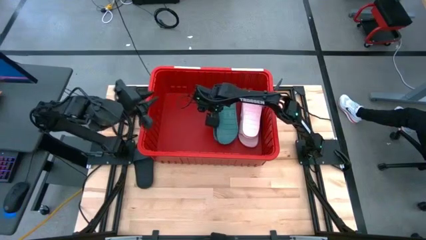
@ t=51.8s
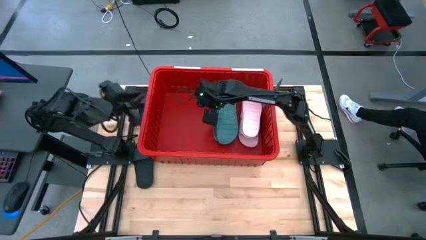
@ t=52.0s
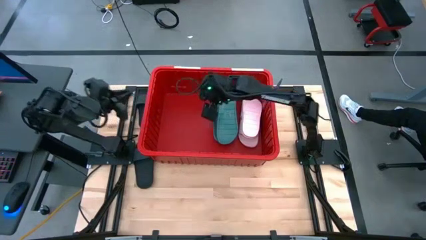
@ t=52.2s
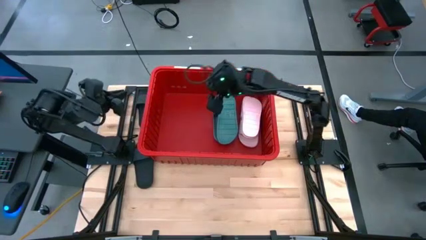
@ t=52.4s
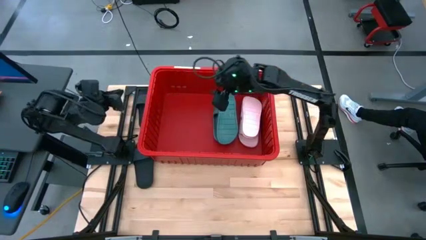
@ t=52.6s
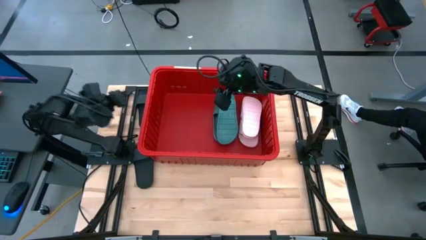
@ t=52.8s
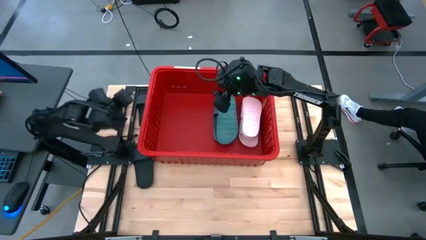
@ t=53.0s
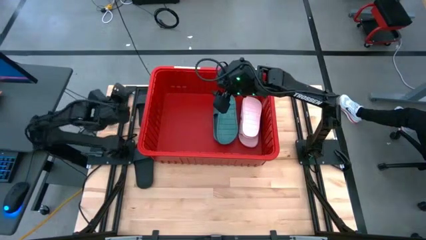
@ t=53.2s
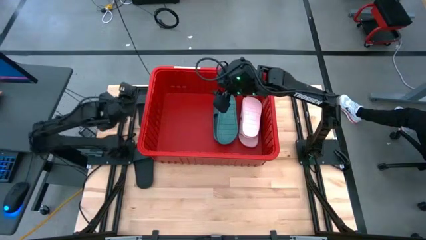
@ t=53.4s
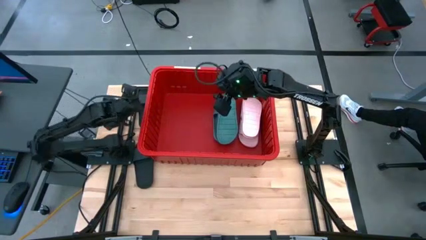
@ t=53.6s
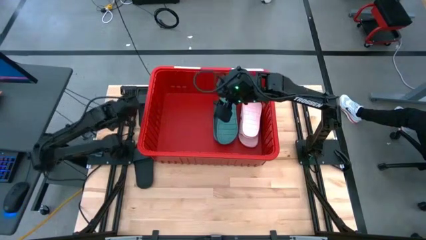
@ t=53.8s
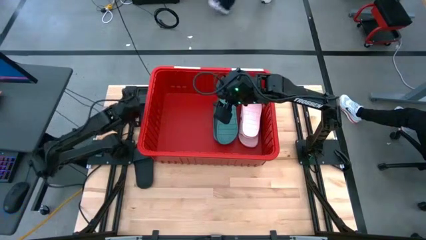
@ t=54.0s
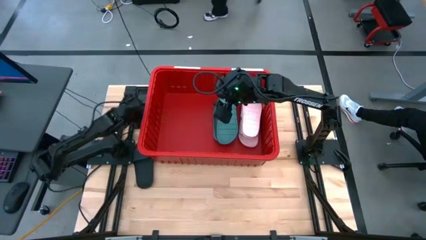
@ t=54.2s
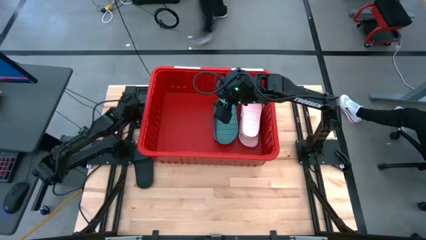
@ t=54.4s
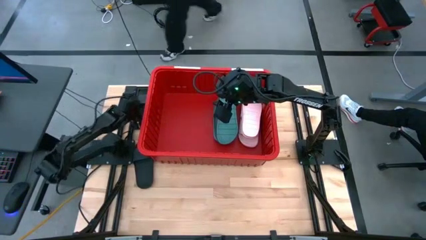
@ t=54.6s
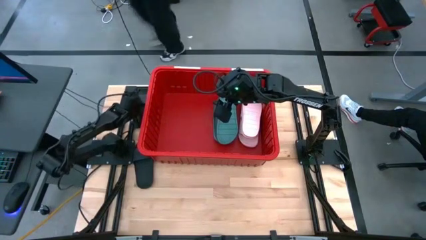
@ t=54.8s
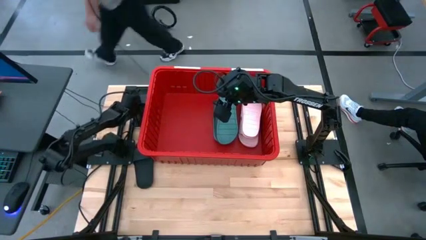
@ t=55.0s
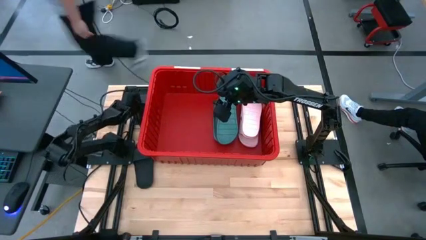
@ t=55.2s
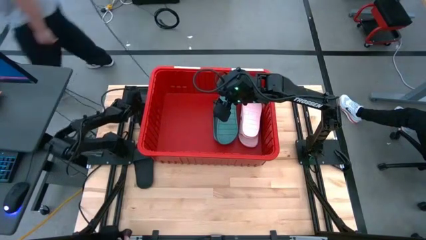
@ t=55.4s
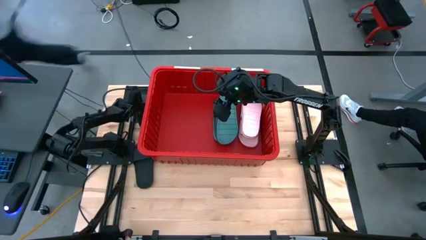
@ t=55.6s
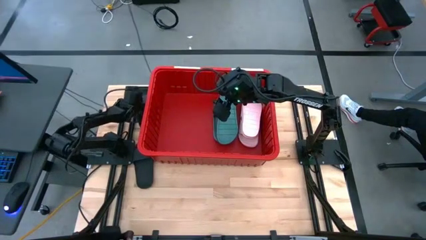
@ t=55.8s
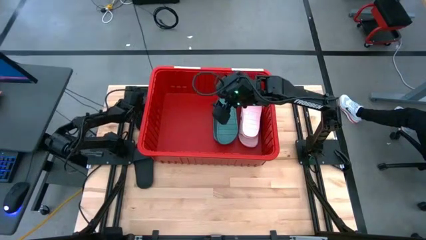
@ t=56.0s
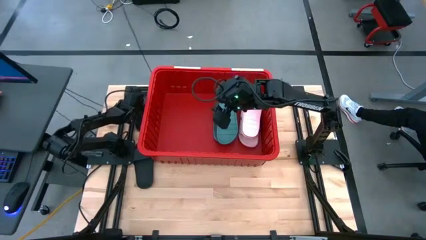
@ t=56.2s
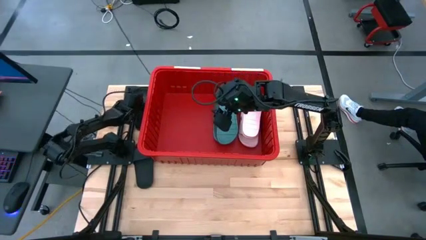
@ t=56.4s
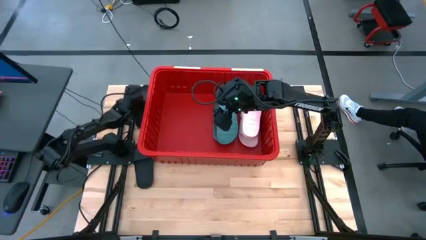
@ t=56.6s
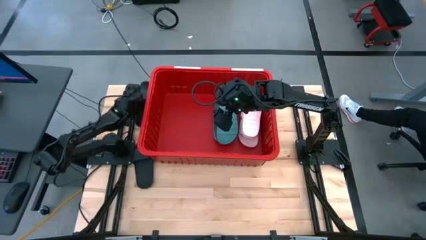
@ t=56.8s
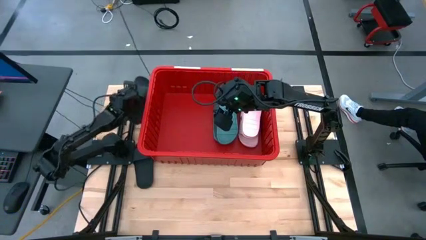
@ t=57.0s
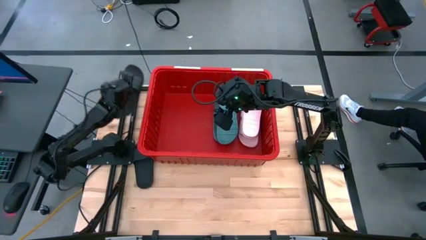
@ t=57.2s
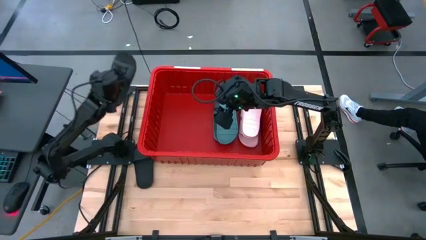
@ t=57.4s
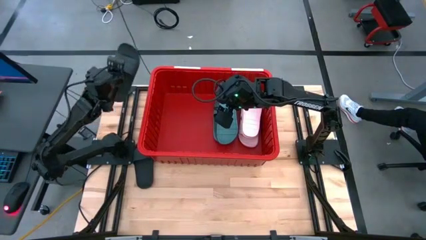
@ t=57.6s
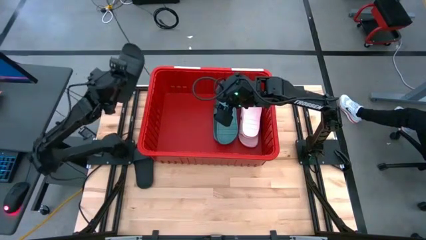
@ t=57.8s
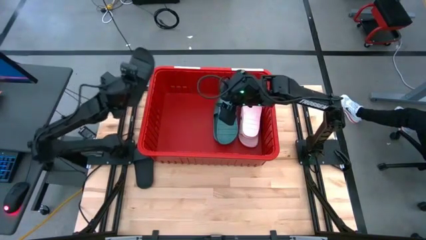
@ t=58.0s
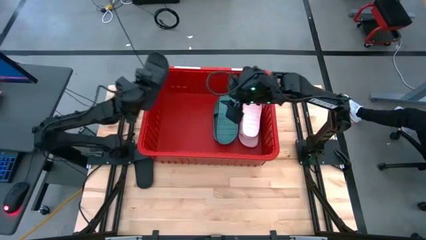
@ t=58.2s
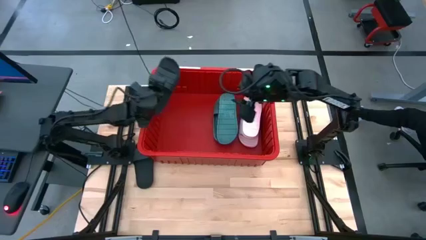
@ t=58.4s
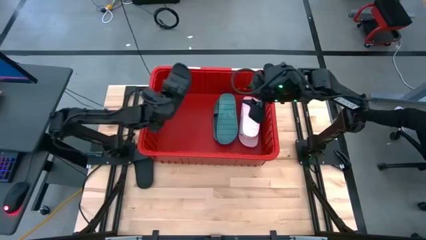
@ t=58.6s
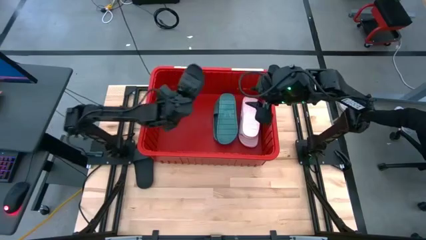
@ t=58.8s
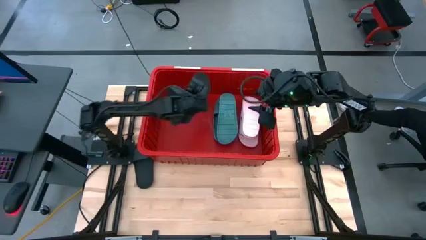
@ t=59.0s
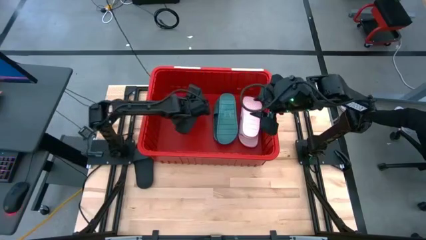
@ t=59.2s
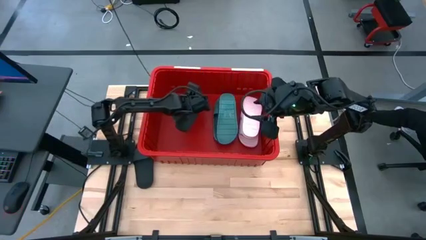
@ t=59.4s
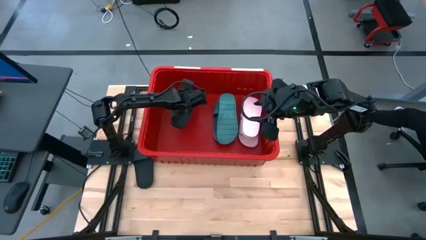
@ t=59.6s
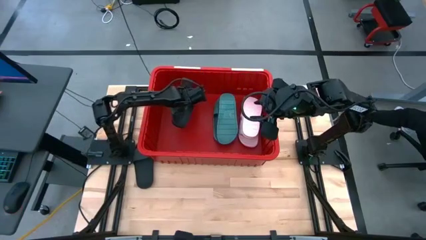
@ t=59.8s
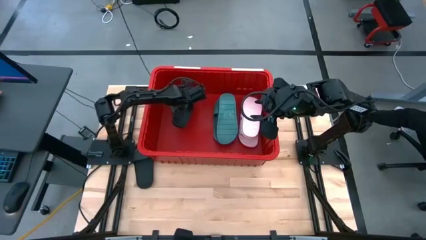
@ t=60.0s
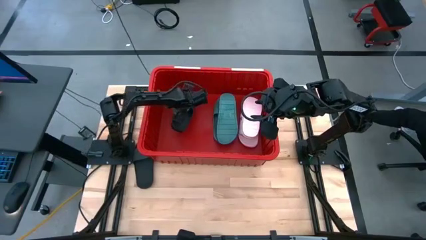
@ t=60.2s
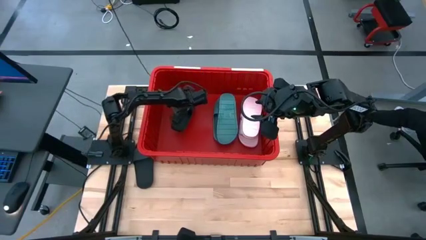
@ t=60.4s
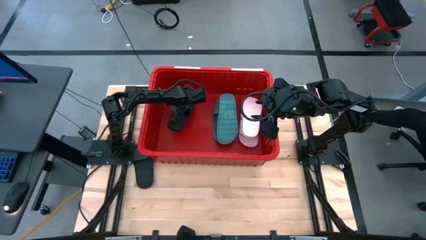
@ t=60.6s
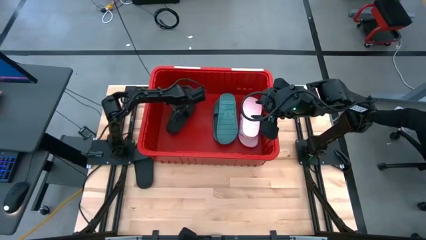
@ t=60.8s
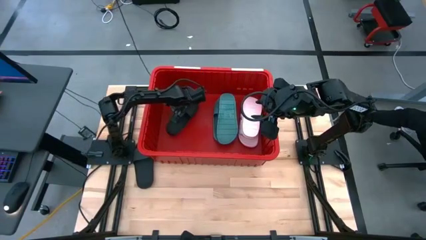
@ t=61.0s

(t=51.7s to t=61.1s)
Task: Pick and place slides into bin
Put the top black slide in the red bin

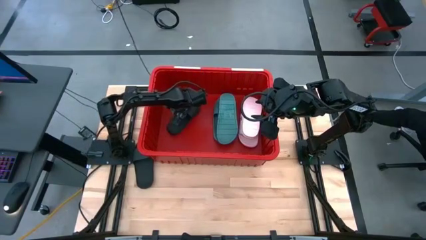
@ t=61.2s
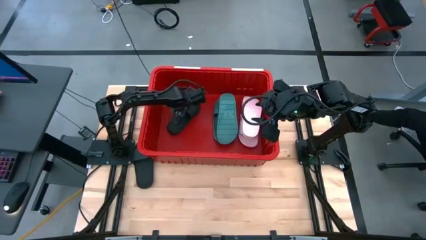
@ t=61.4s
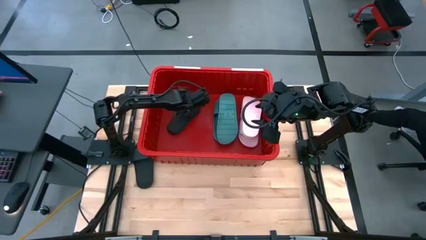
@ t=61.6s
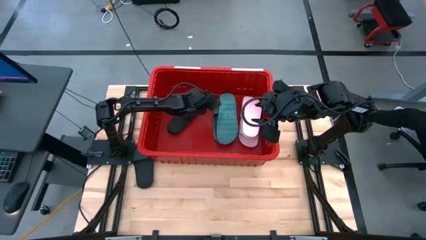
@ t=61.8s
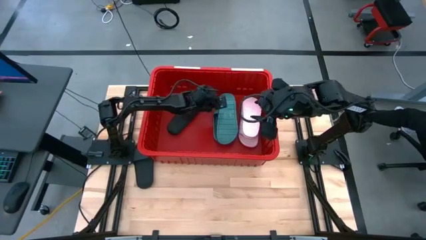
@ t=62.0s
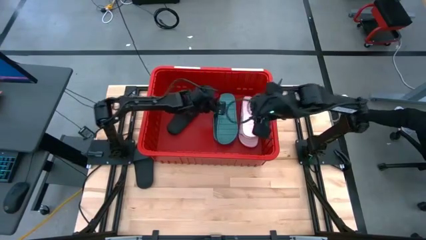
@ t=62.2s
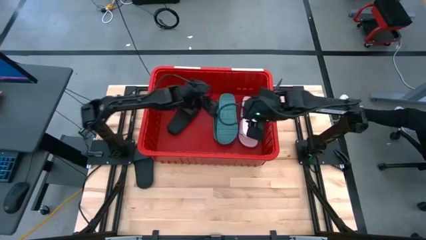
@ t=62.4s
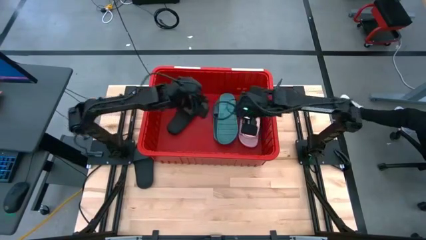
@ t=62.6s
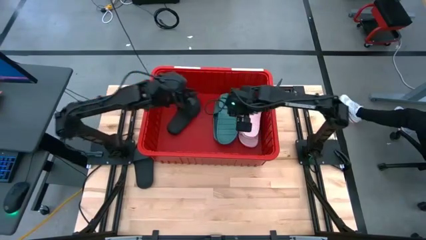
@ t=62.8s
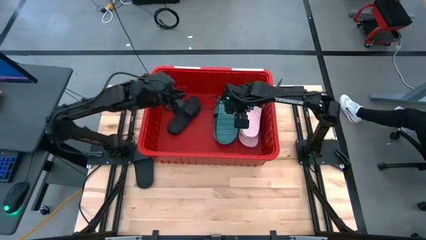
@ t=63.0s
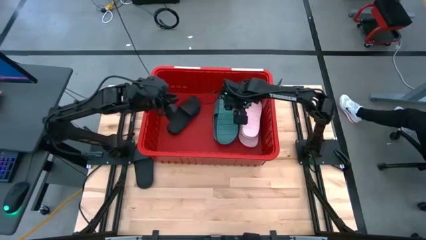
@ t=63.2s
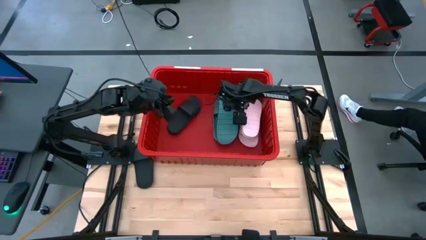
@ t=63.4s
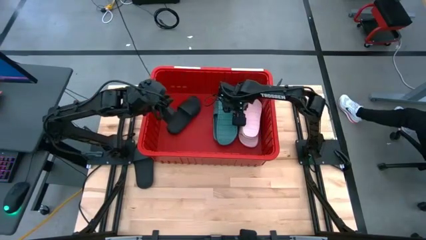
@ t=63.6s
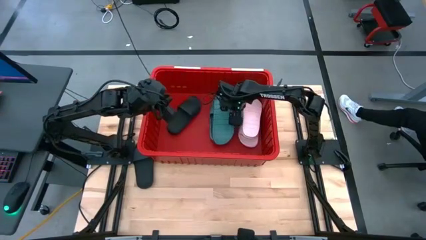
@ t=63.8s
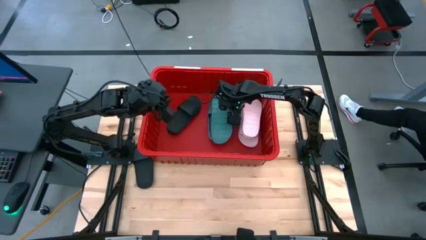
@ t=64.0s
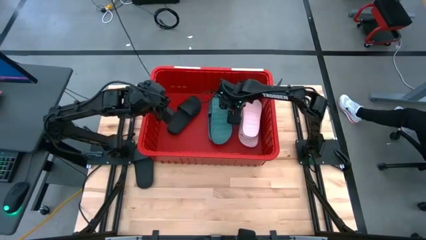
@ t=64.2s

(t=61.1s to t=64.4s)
Adjust the green slides in the red bin

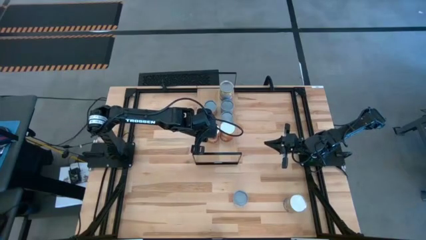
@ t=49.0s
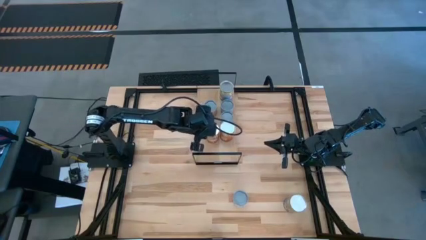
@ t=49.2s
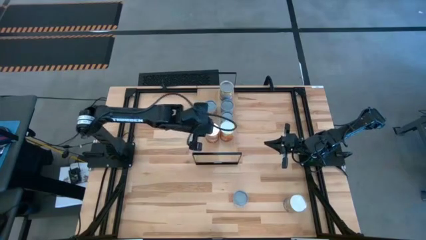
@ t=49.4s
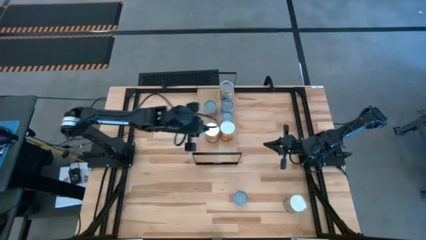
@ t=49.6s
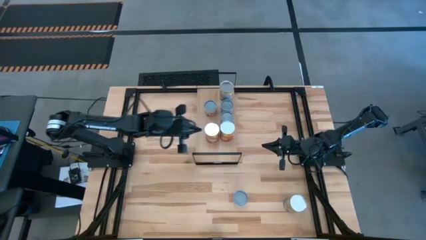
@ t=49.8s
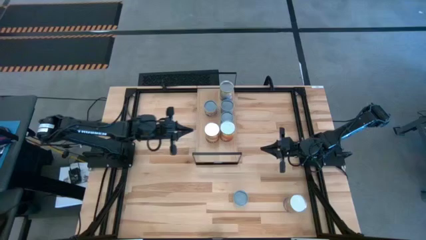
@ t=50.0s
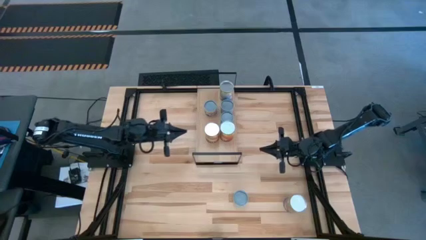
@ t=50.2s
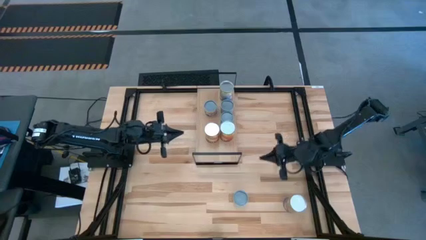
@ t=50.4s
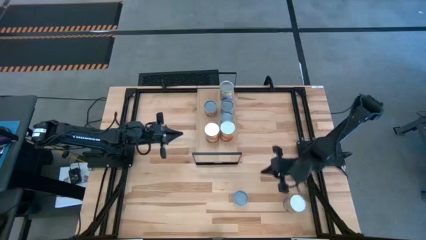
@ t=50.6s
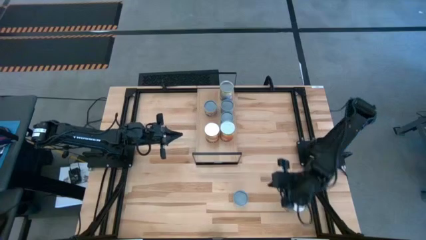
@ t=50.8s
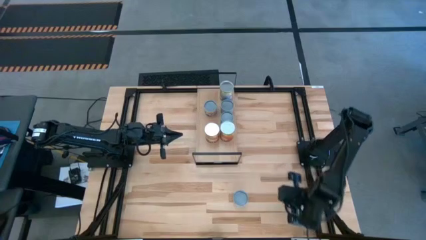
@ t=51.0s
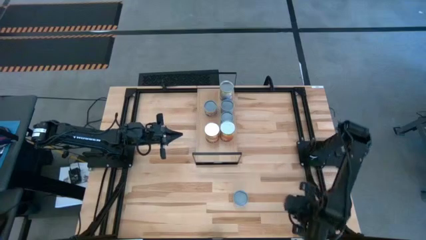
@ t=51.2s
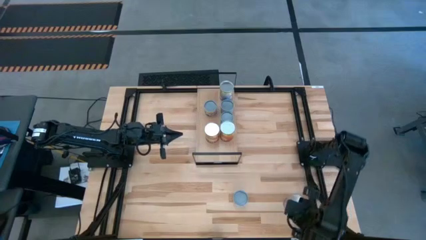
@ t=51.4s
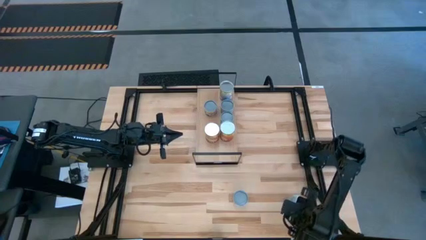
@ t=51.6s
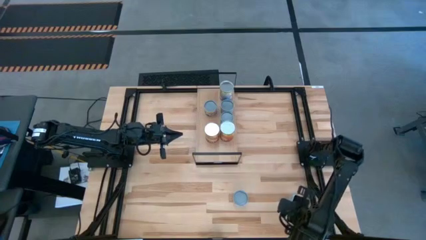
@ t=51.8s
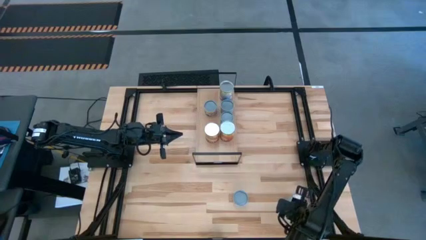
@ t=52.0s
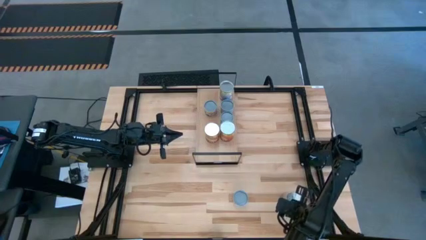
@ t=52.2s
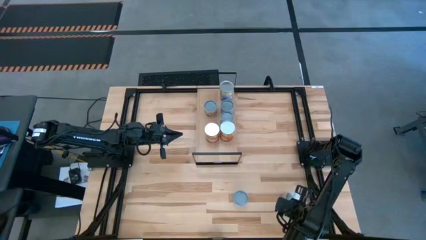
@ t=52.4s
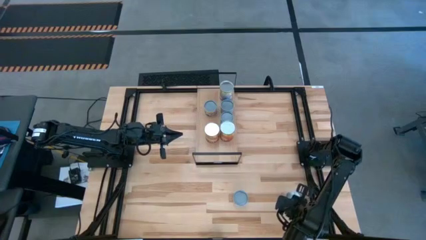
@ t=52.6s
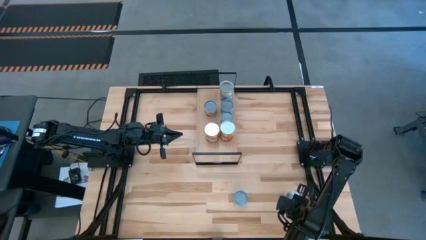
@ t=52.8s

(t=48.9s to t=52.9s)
Task: Pick and place cans onto a shelf
Put the peaches can on the shelf
